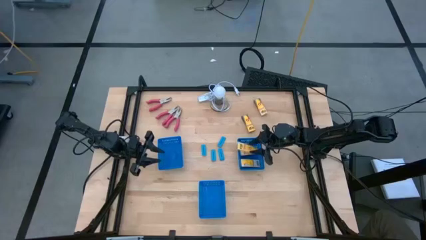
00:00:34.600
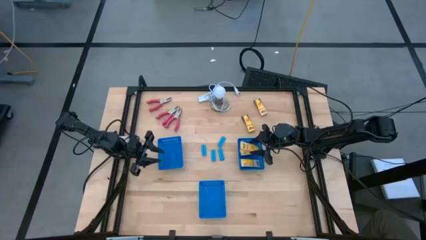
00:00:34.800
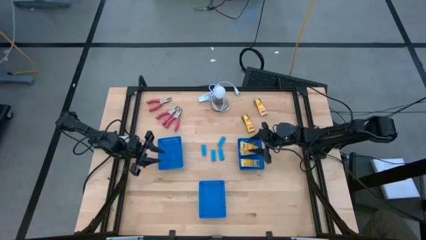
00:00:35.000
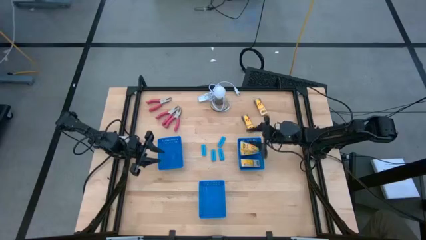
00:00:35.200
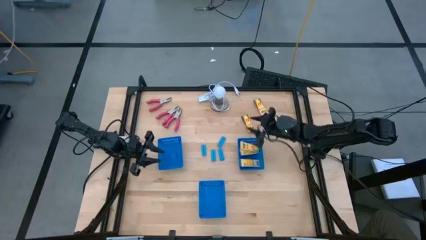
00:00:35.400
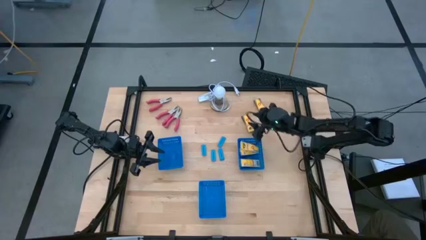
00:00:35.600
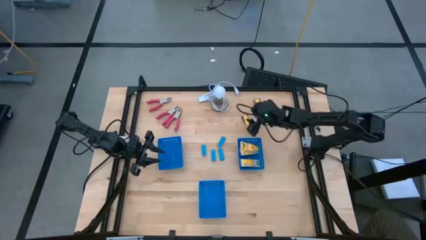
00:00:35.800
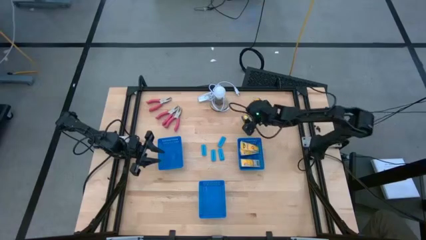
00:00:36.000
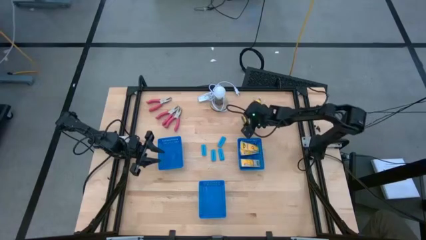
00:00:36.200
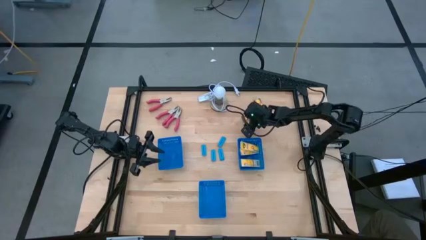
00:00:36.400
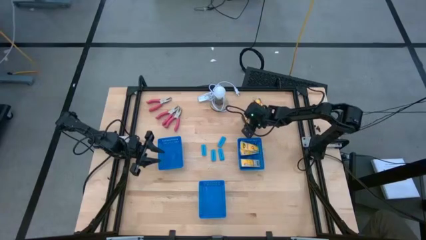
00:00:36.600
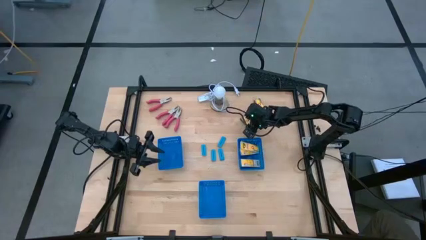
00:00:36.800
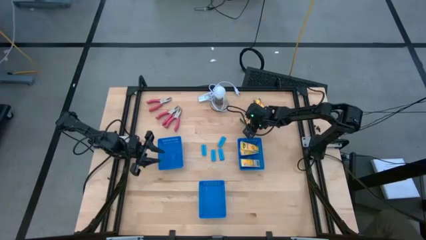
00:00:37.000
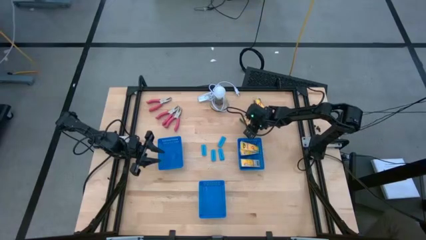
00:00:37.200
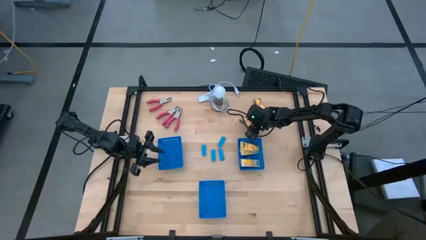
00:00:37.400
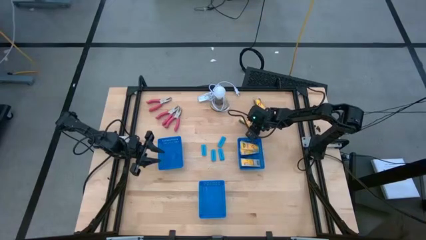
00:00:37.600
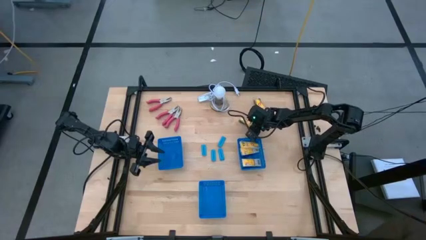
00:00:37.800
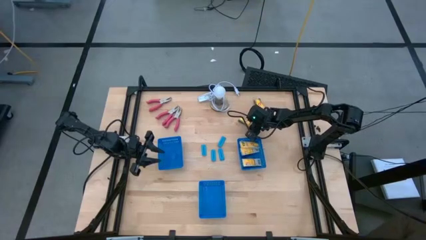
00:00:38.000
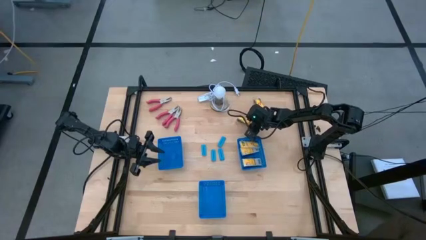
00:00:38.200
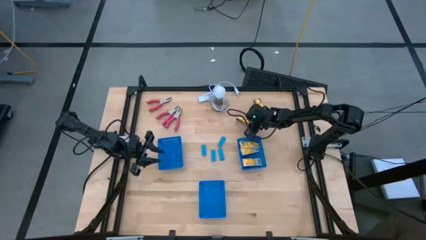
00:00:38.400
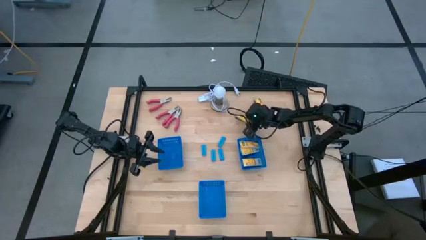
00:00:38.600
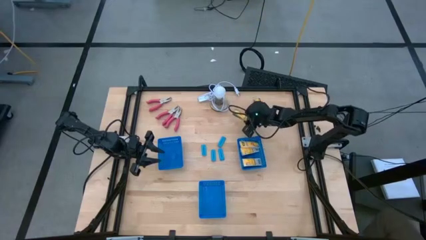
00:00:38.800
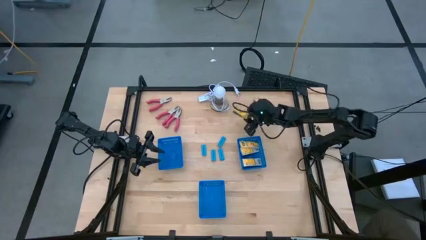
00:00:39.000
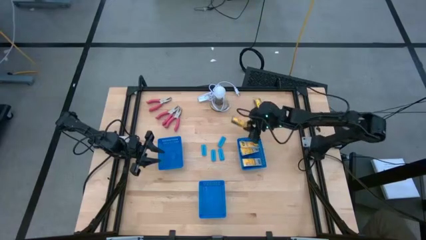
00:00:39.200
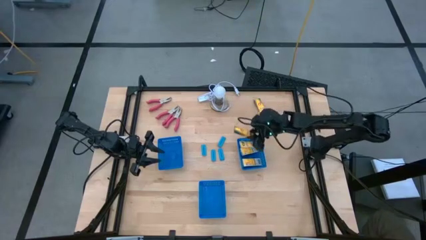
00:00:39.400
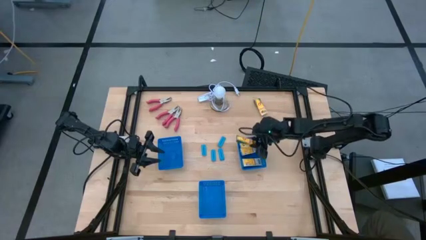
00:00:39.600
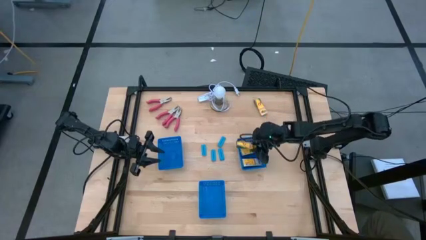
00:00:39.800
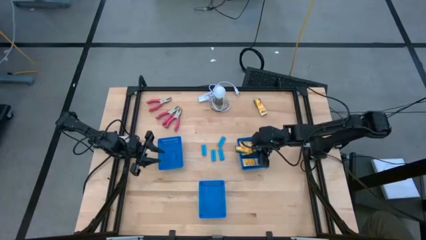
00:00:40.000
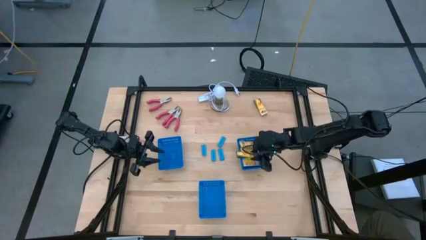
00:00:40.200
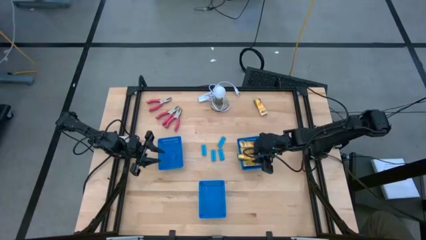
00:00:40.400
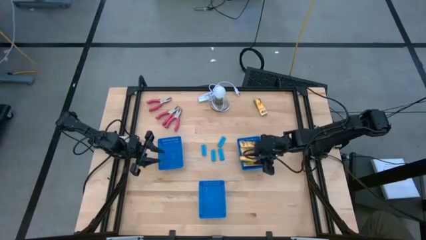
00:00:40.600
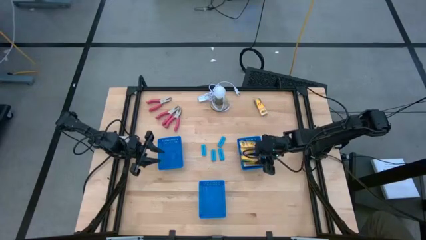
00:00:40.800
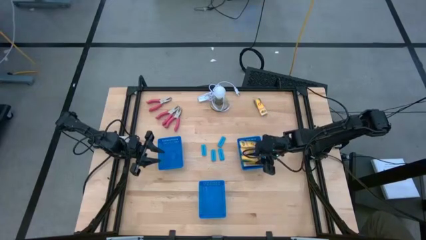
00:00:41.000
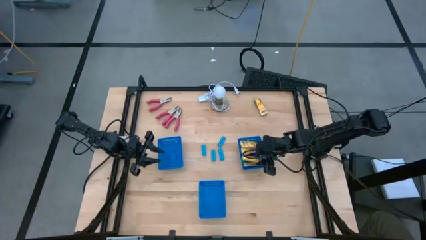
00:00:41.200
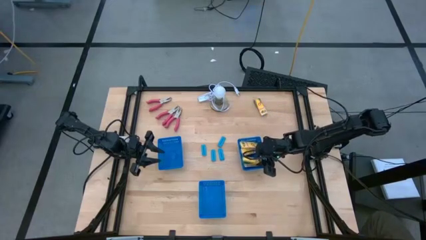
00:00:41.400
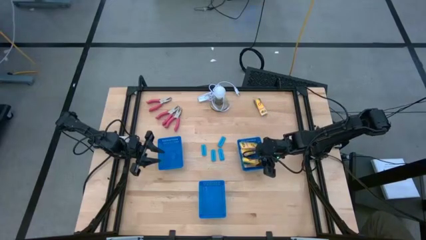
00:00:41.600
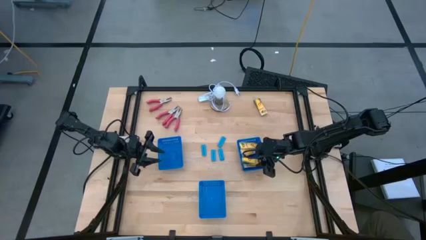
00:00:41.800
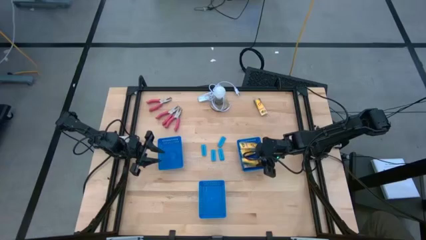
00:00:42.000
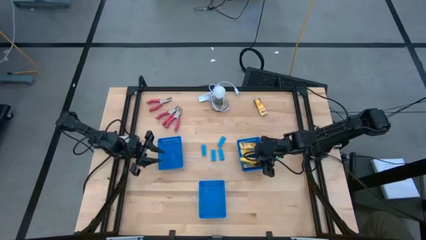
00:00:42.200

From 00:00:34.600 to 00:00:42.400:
Task: Pick & Place School Supplies
Put the yellow crayon box into the top right blue bin

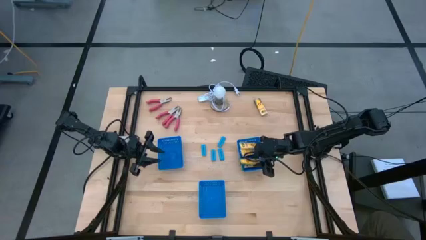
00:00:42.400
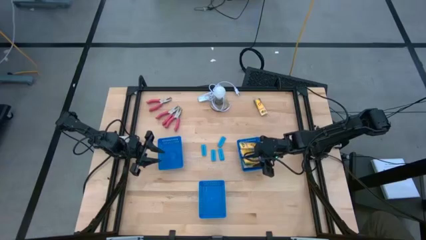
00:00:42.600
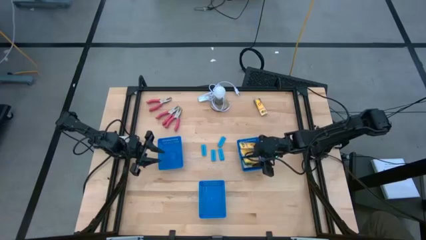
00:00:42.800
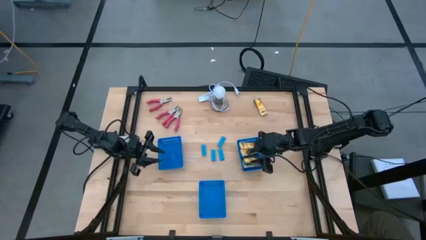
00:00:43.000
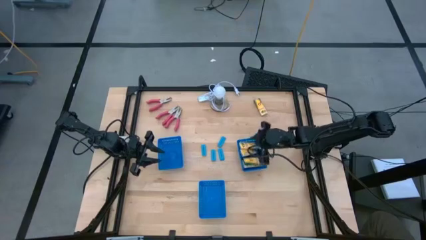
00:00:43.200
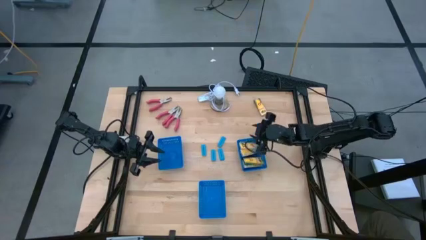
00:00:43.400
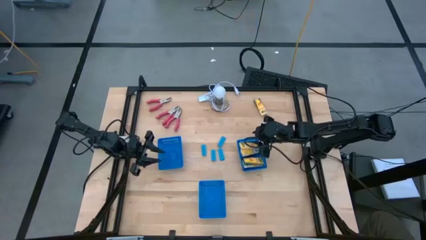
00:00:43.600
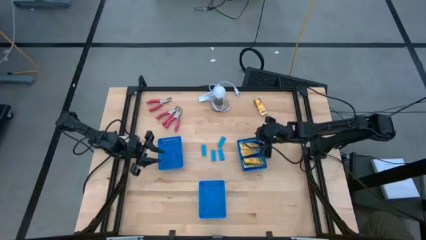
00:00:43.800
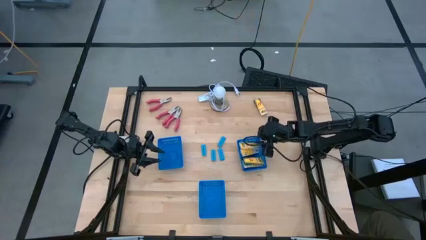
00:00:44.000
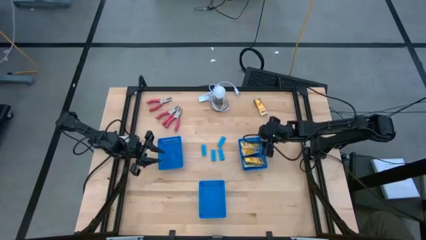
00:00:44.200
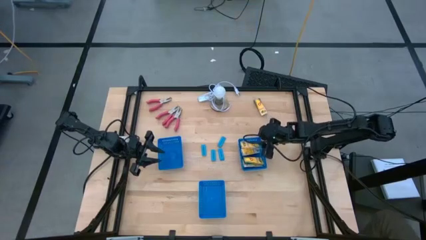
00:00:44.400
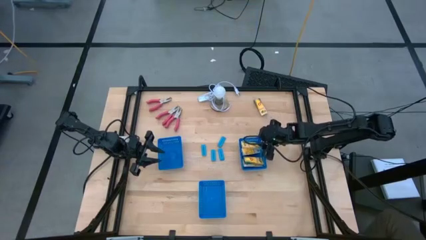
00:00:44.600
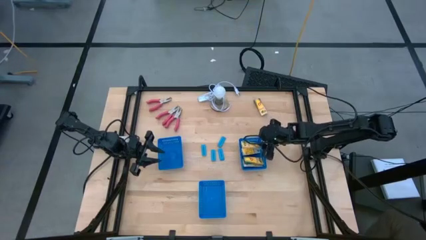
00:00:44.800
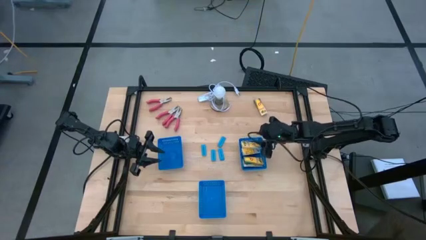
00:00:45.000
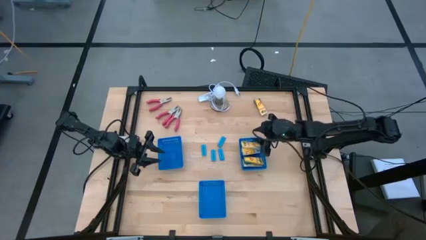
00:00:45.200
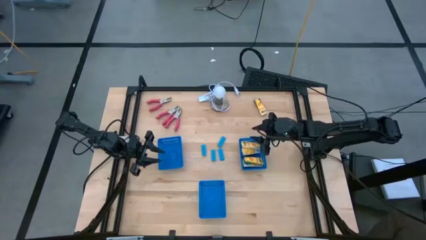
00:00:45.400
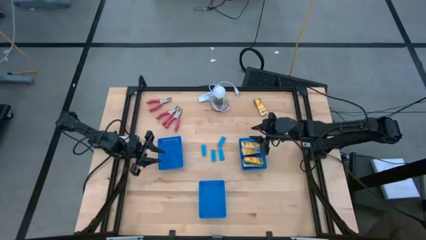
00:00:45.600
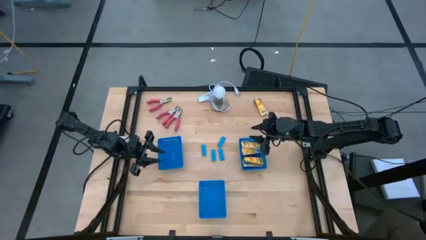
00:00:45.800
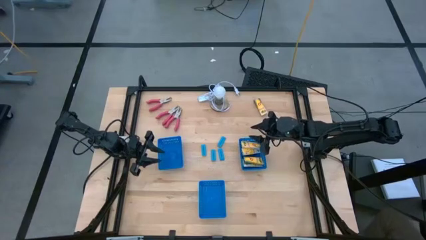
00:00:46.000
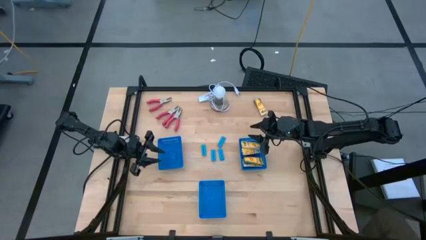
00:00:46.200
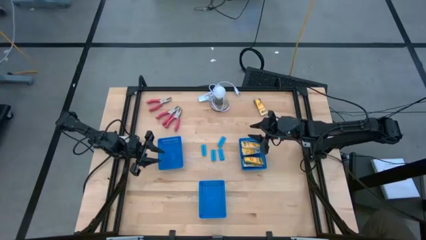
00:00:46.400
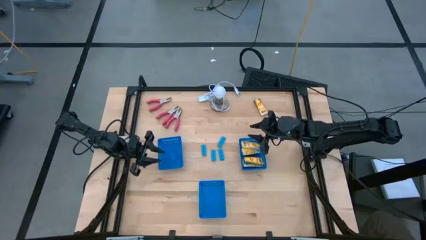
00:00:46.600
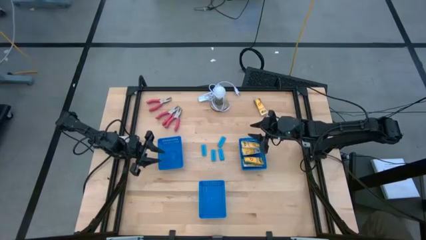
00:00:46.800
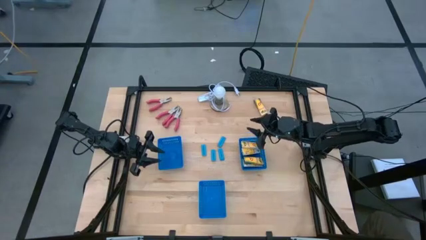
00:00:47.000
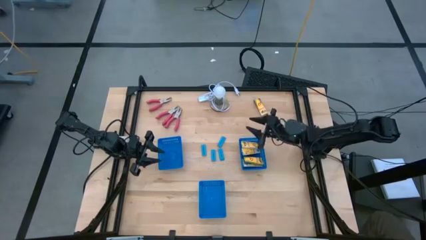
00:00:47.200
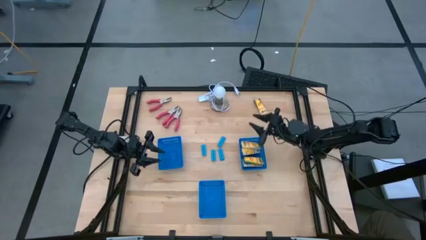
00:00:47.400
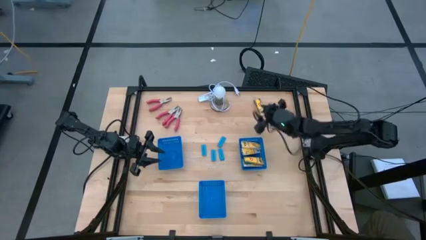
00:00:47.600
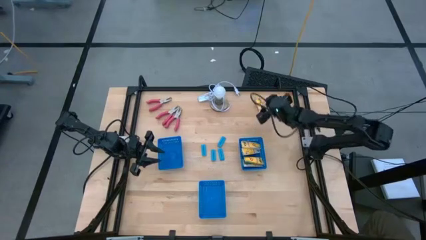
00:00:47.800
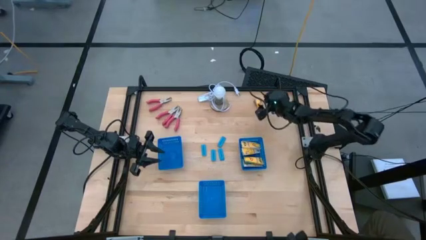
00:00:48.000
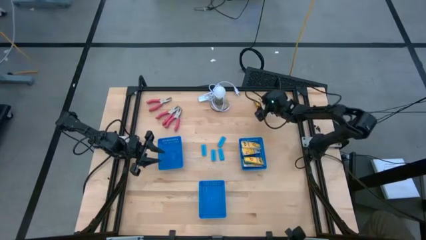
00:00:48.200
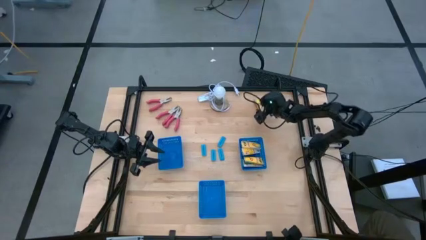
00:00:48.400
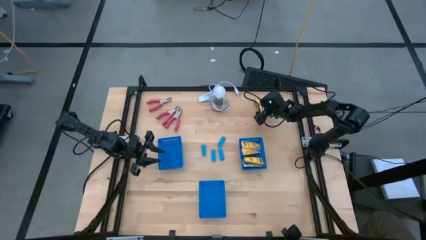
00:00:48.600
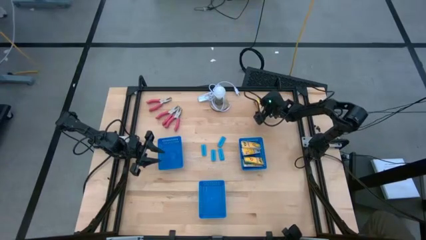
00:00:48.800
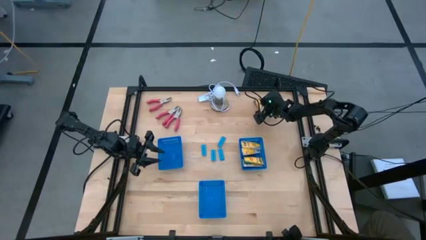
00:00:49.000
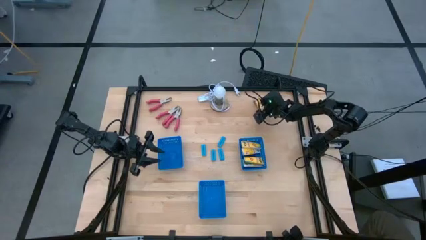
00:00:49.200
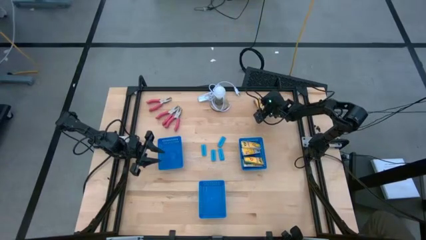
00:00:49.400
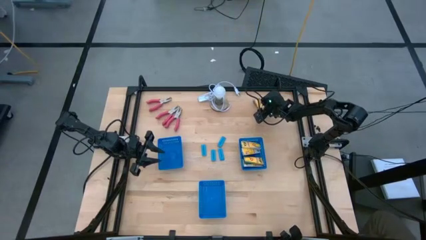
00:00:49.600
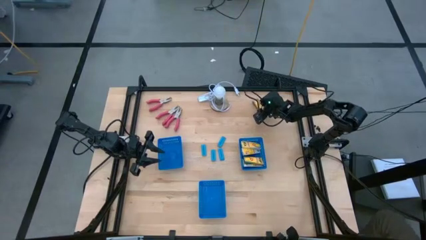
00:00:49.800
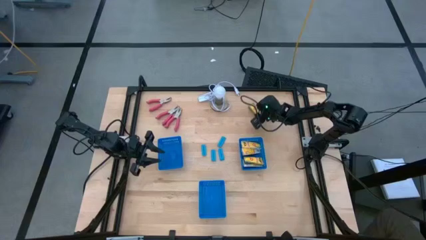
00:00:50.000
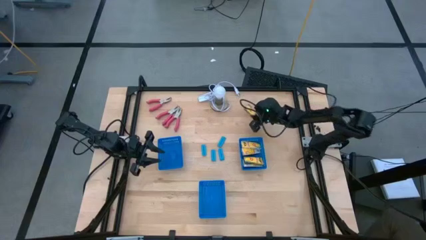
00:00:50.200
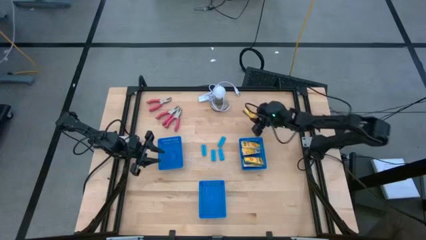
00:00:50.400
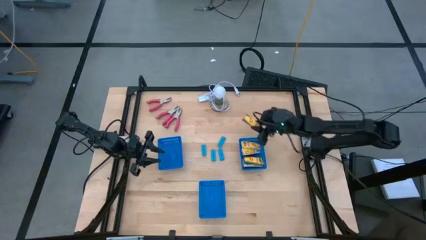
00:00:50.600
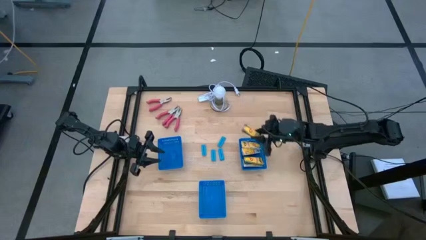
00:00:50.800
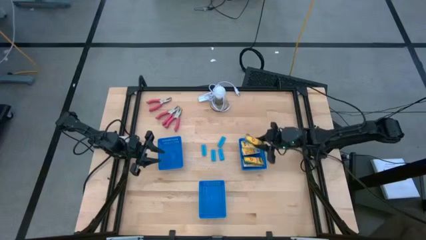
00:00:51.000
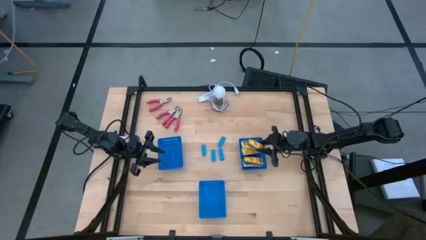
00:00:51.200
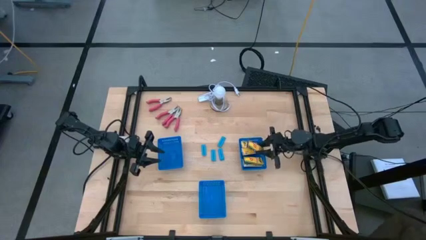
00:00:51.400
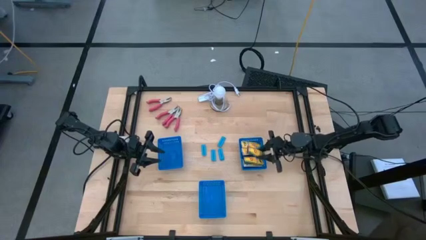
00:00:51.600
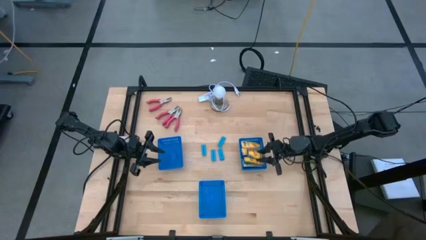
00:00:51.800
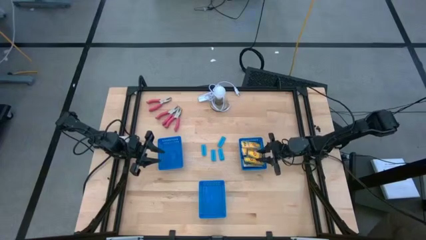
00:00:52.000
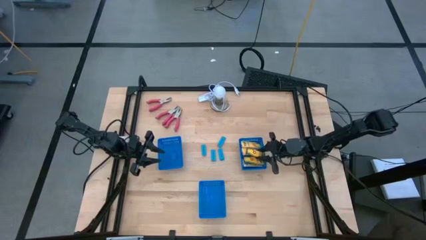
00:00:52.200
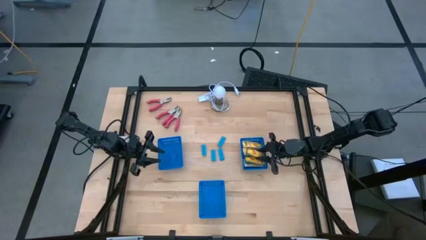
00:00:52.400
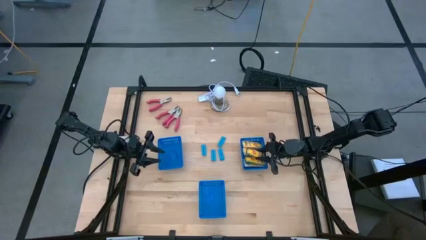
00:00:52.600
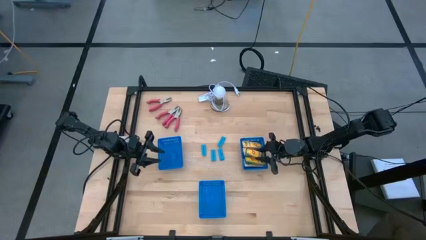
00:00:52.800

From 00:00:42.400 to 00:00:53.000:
Put the yellow crayon box into the top right blue bin
